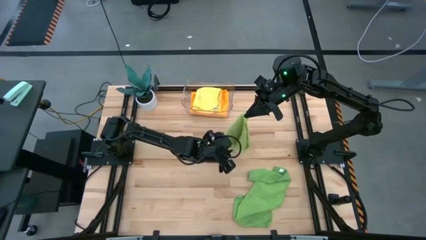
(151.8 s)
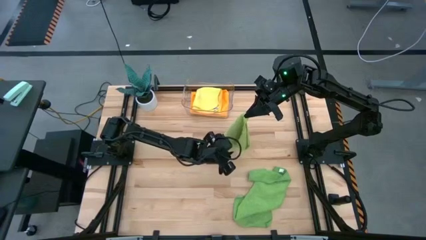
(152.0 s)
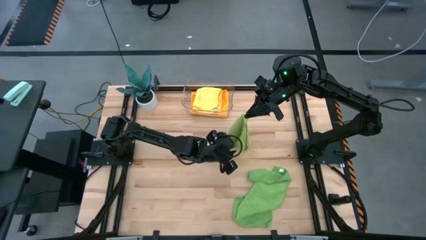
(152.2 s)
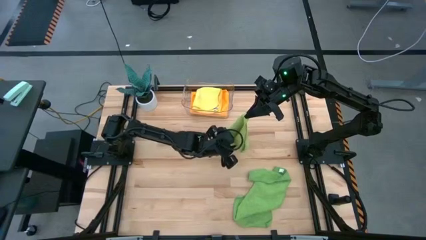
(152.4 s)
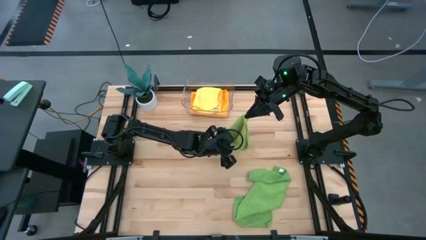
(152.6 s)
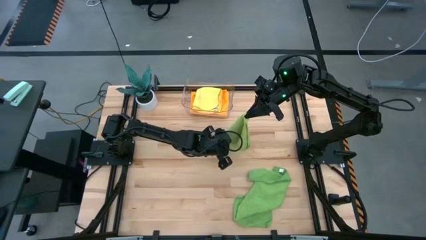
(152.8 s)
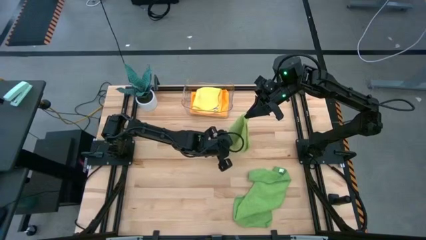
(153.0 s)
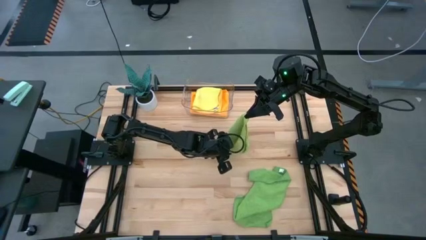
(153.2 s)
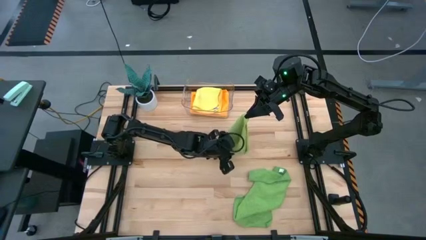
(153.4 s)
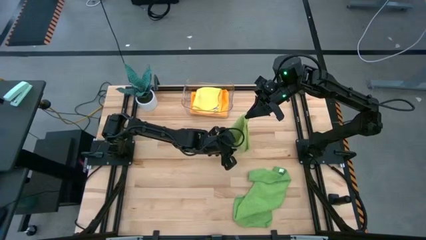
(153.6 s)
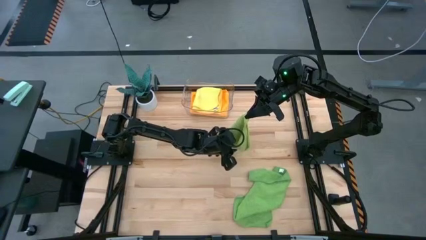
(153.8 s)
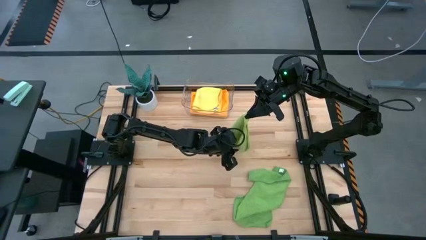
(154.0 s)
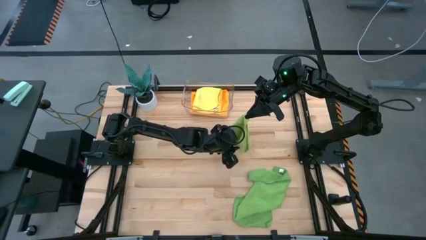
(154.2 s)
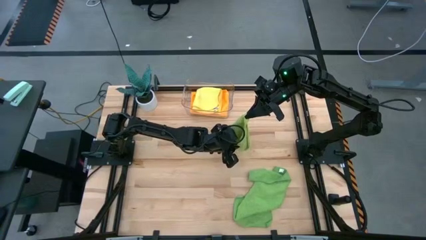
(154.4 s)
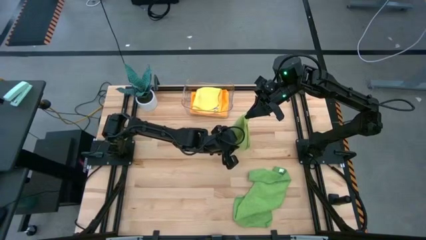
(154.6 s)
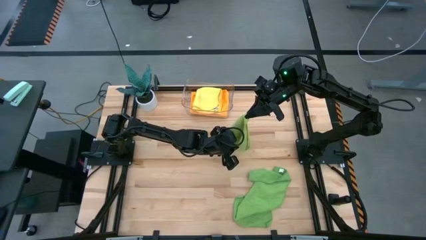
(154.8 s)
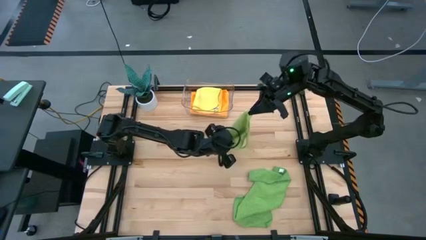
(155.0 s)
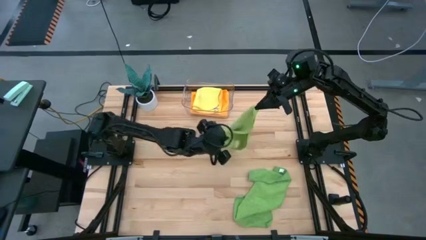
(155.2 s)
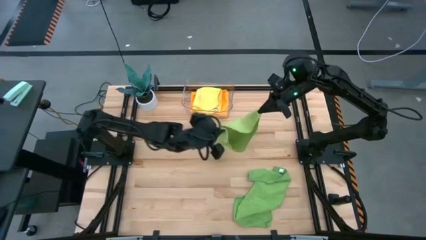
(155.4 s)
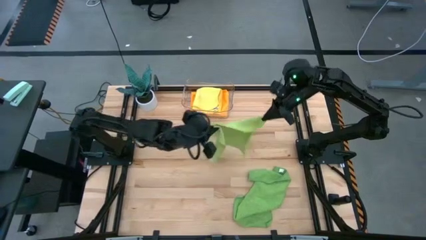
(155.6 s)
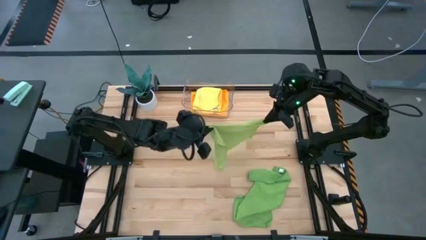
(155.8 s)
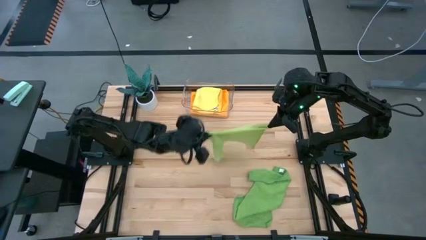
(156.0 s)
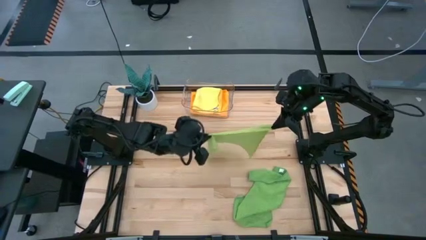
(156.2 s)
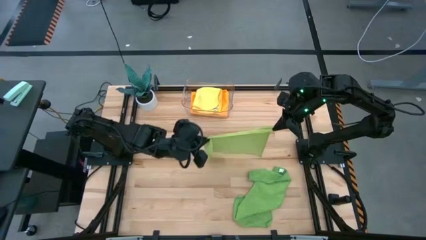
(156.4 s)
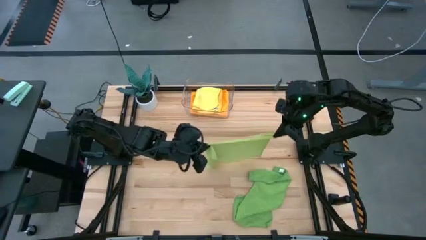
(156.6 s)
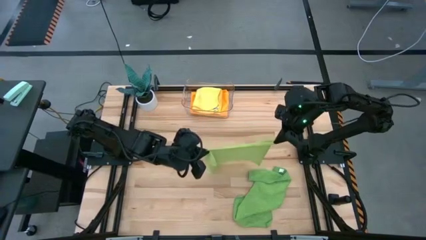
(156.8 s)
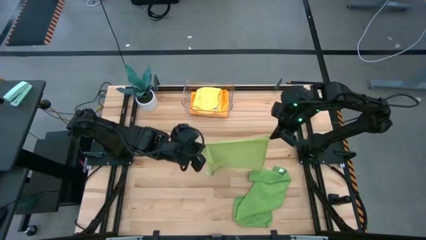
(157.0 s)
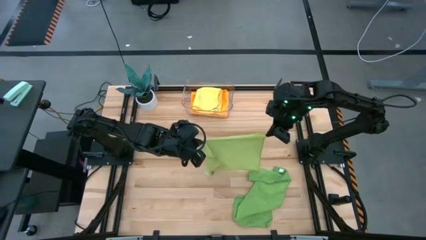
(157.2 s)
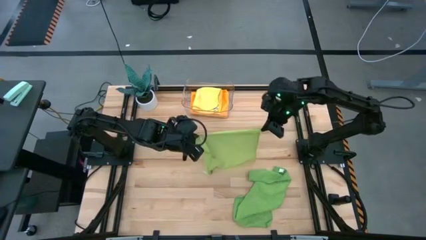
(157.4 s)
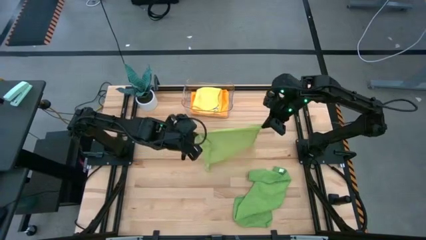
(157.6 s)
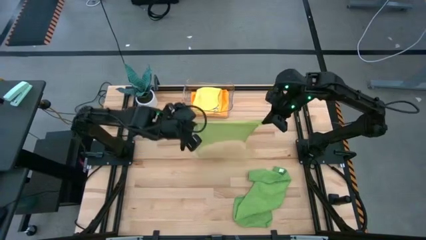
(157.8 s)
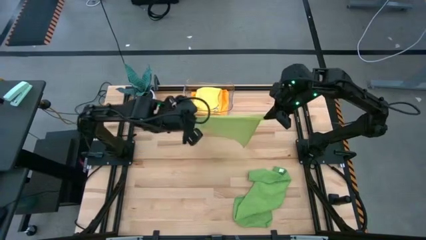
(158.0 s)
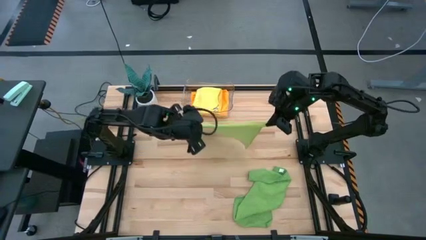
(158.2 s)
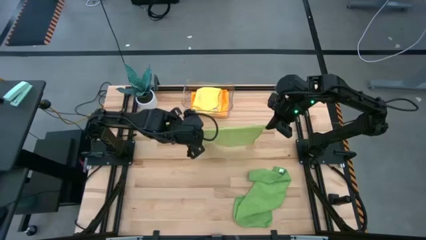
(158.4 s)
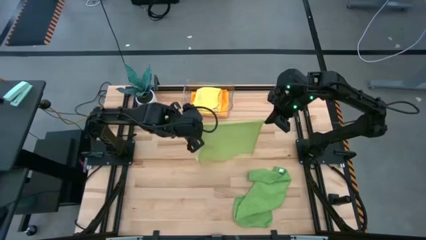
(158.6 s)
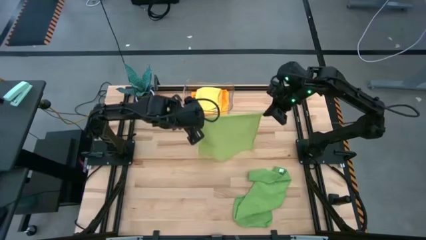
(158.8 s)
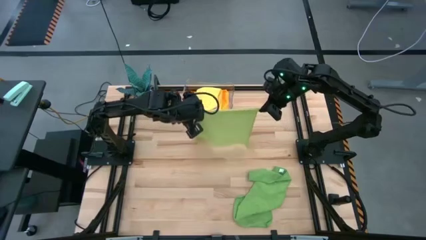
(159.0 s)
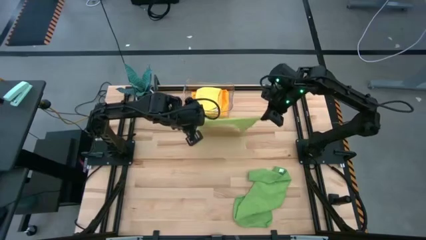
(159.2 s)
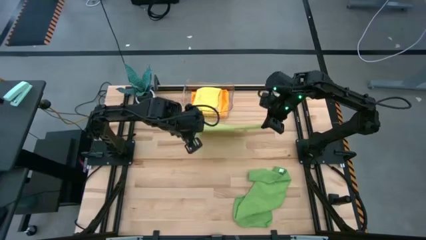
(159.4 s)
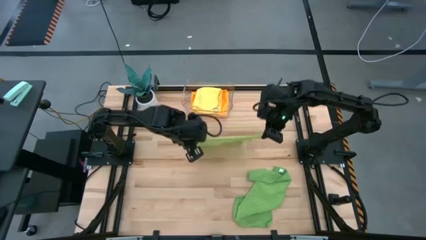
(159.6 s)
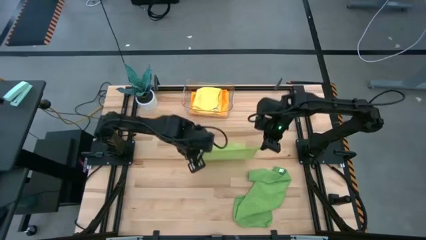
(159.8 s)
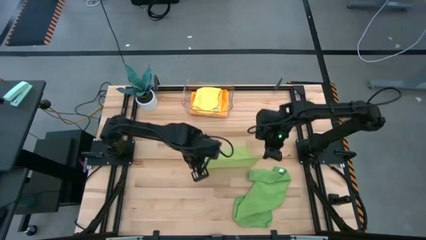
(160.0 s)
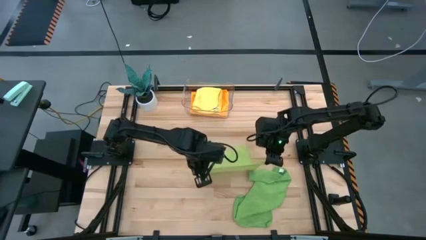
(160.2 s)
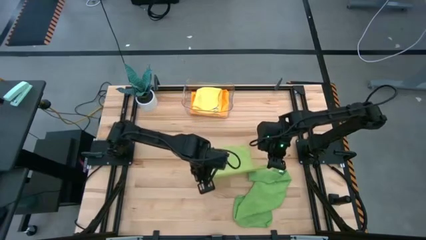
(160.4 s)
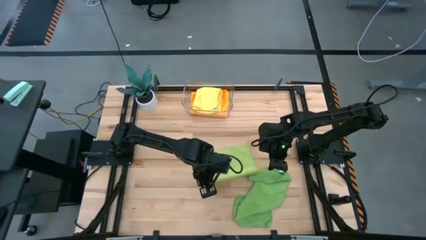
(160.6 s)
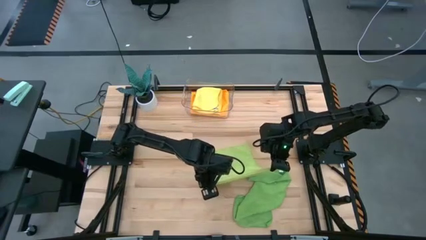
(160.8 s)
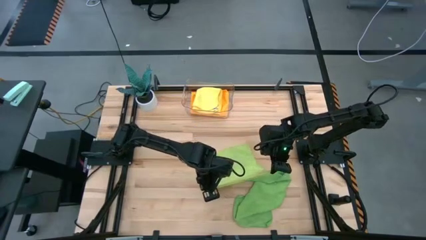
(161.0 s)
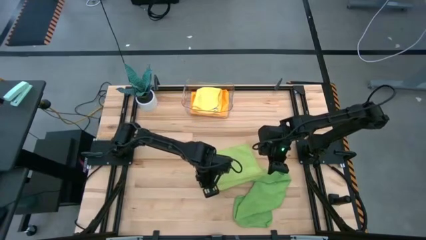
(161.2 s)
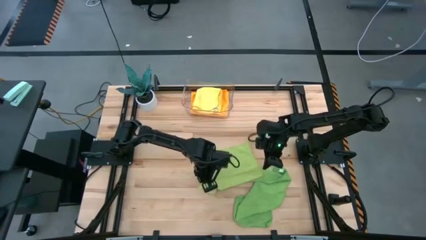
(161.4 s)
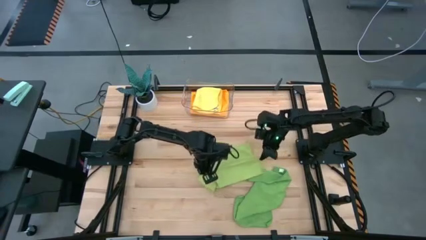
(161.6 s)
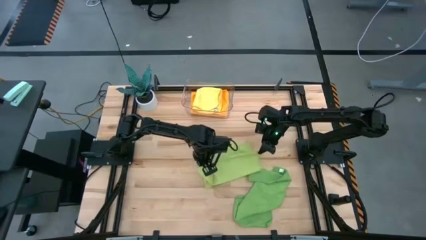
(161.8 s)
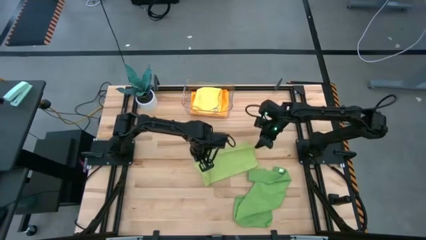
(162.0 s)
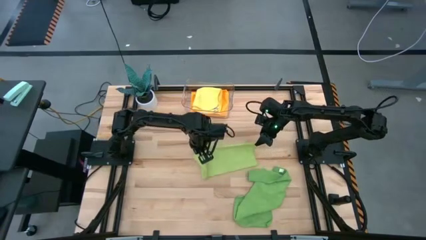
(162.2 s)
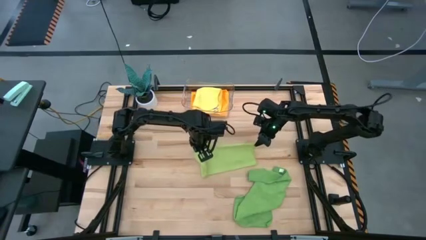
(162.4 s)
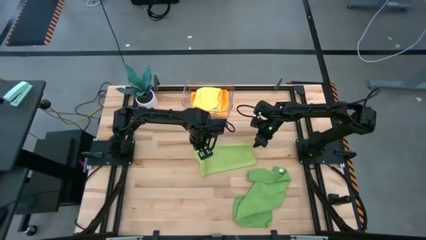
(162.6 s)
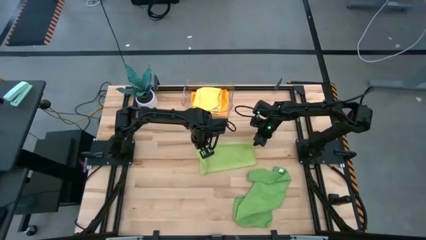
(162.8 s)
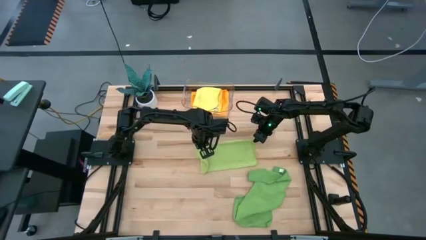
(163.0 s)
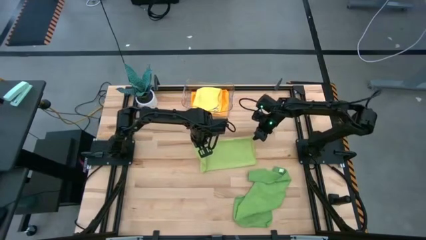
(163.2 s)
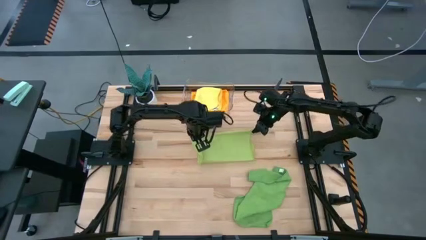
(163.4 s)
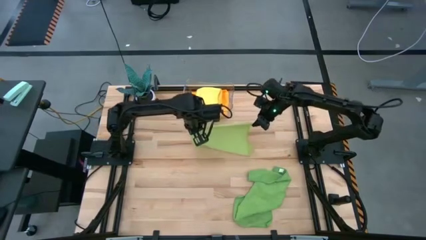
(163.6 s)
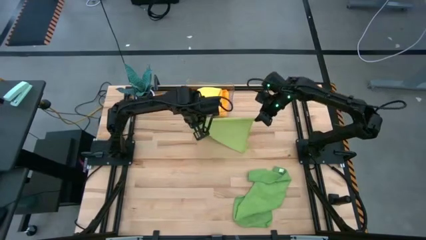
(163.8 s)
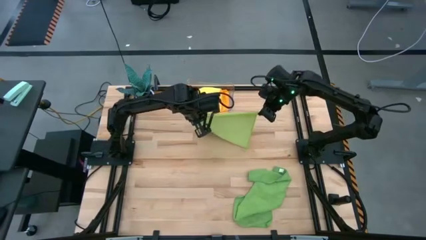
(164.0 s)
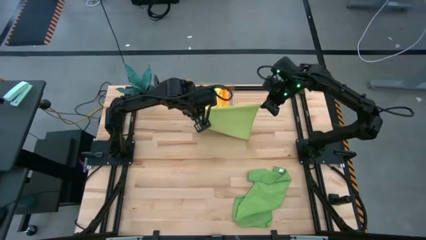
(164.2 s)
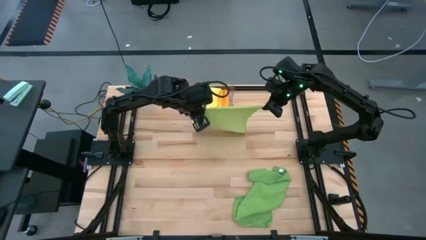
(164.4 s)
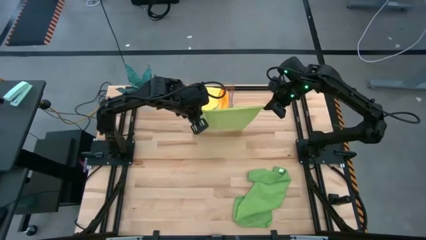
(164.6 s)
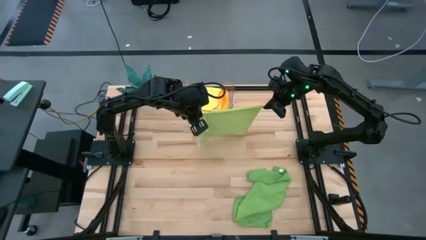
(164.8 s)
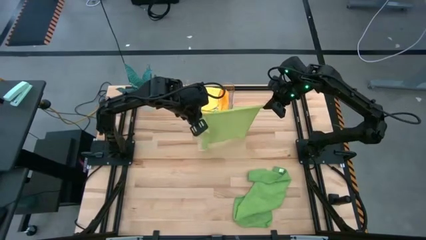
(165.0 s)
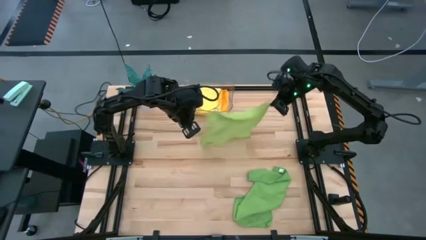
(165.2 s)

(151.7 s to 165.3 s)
Task: Fold microfiber towels
Fold the light green towel
